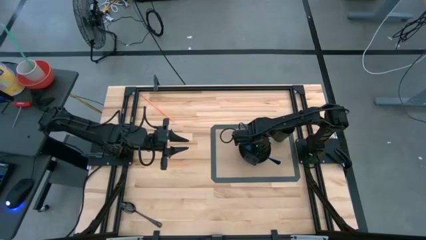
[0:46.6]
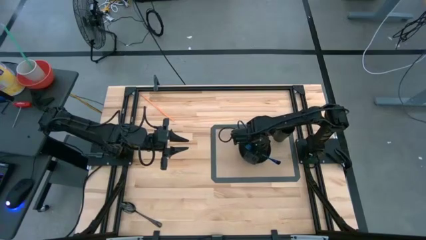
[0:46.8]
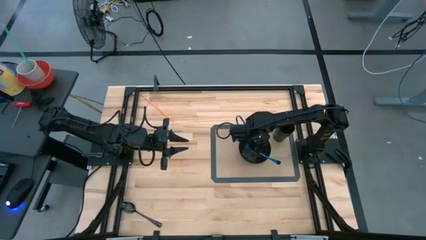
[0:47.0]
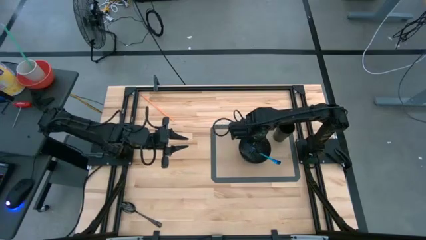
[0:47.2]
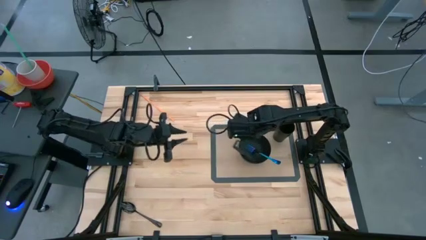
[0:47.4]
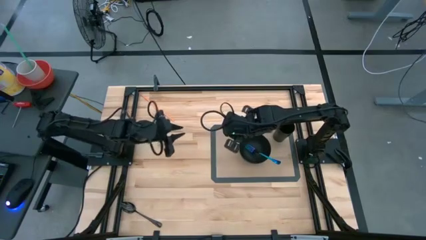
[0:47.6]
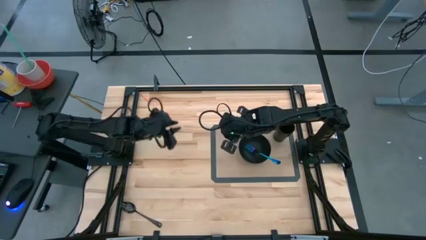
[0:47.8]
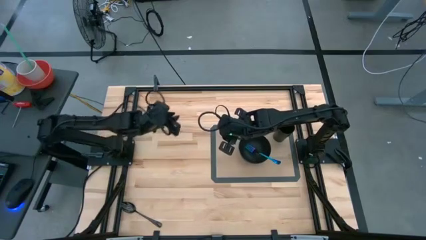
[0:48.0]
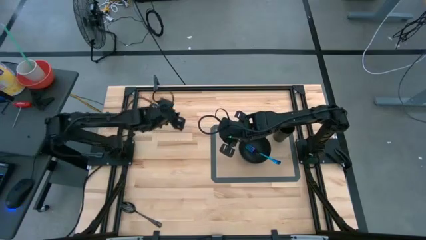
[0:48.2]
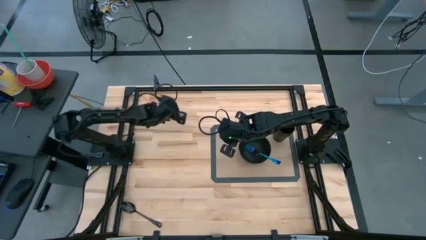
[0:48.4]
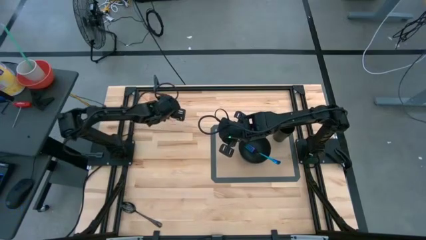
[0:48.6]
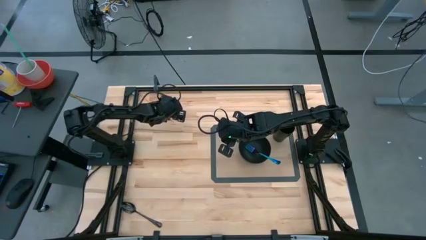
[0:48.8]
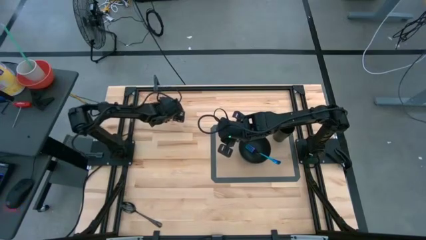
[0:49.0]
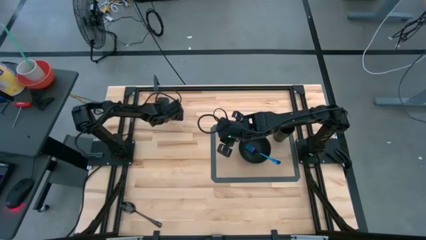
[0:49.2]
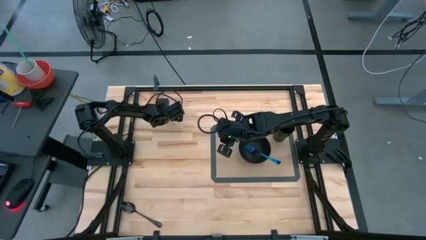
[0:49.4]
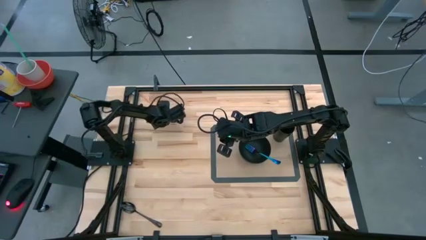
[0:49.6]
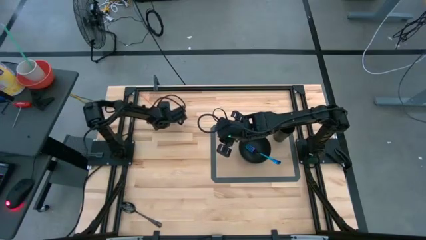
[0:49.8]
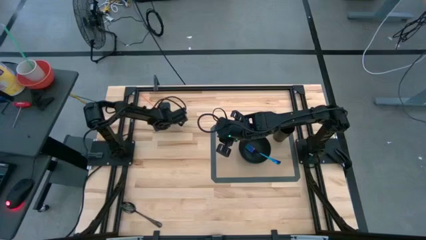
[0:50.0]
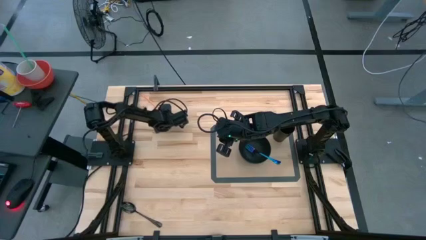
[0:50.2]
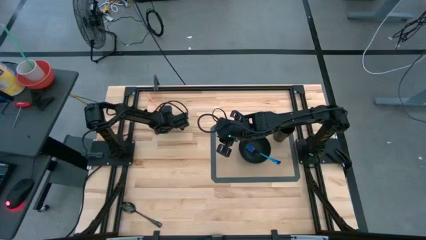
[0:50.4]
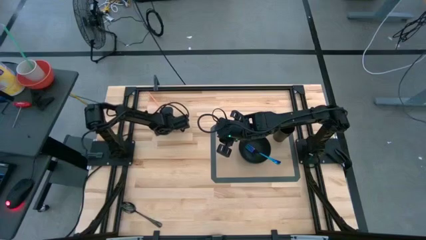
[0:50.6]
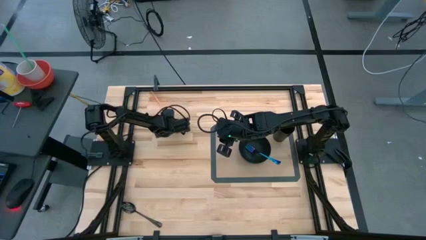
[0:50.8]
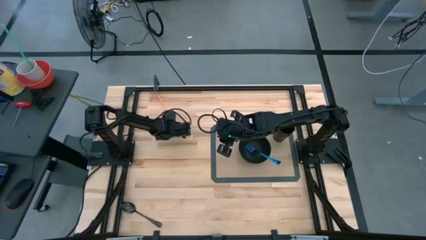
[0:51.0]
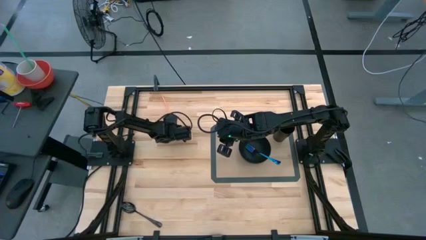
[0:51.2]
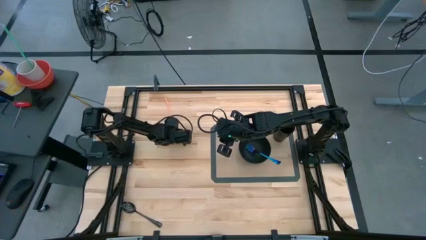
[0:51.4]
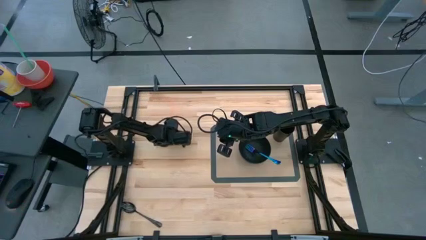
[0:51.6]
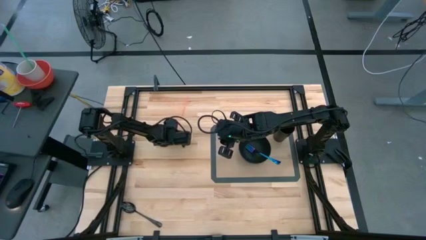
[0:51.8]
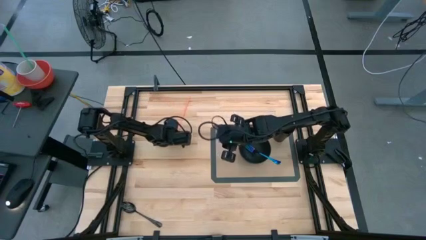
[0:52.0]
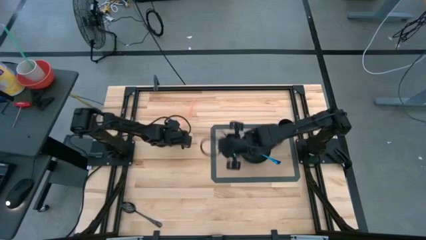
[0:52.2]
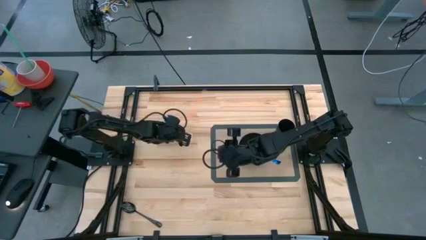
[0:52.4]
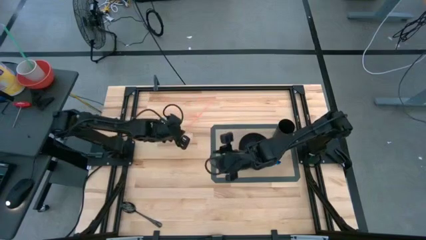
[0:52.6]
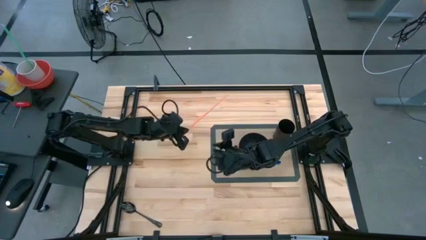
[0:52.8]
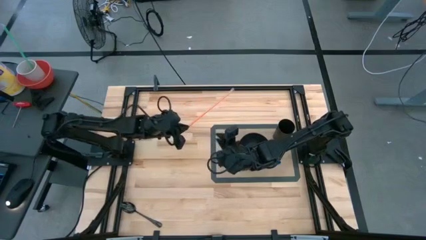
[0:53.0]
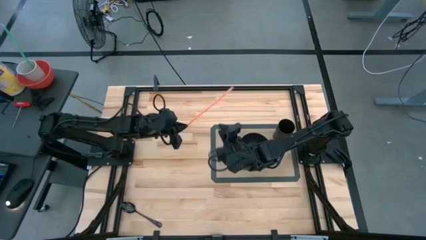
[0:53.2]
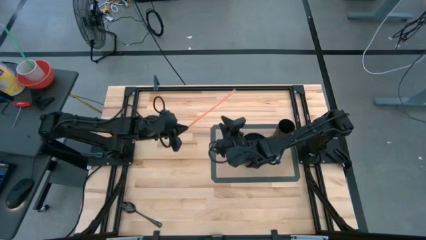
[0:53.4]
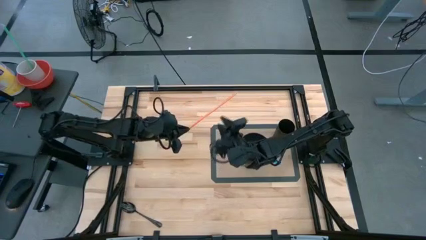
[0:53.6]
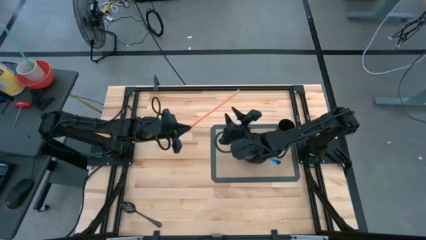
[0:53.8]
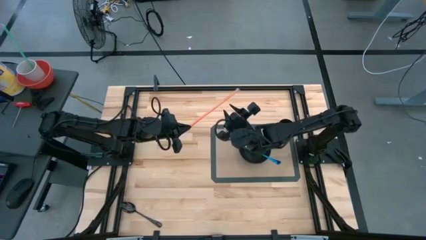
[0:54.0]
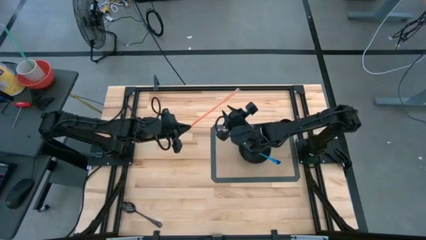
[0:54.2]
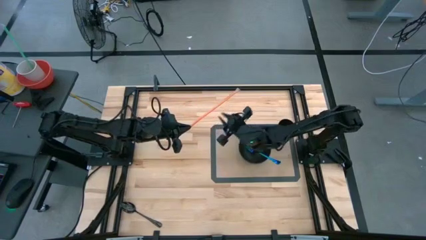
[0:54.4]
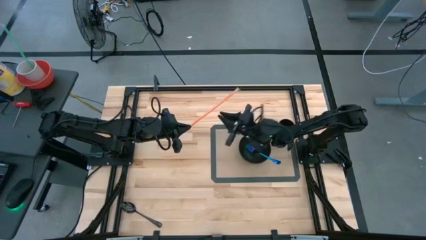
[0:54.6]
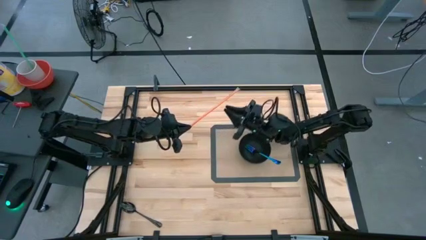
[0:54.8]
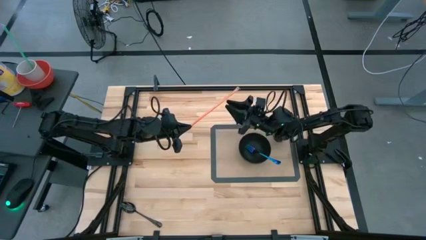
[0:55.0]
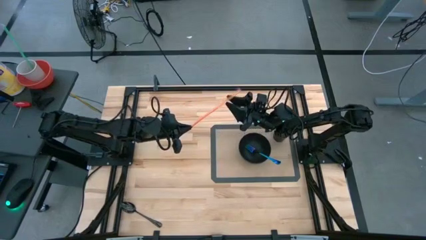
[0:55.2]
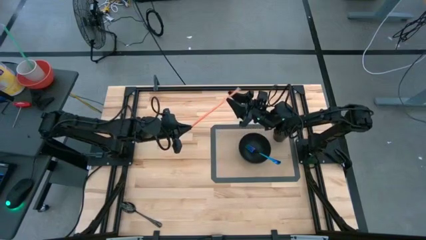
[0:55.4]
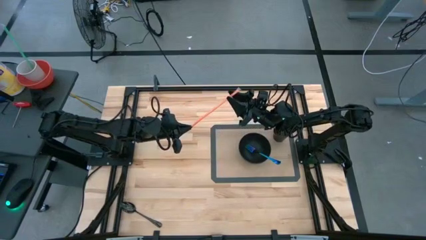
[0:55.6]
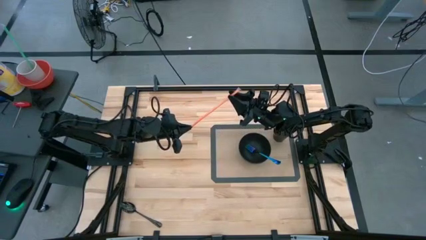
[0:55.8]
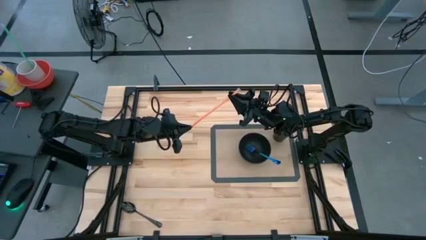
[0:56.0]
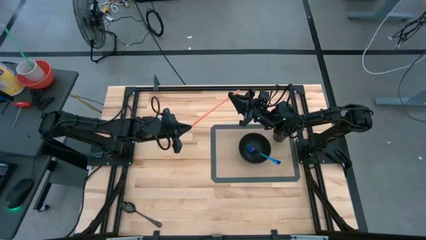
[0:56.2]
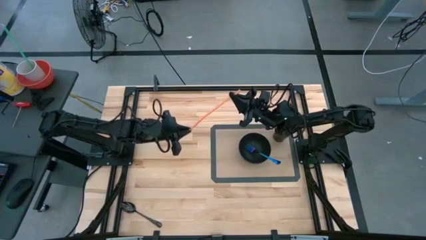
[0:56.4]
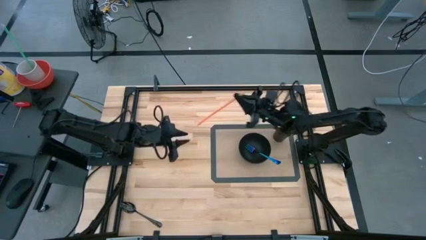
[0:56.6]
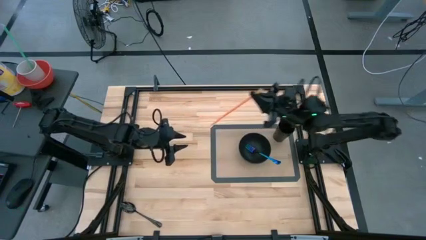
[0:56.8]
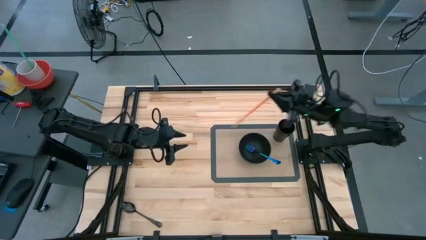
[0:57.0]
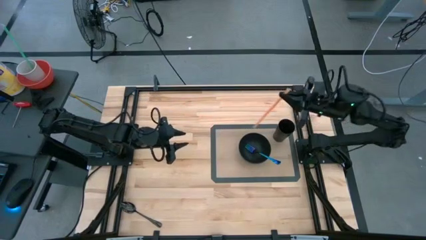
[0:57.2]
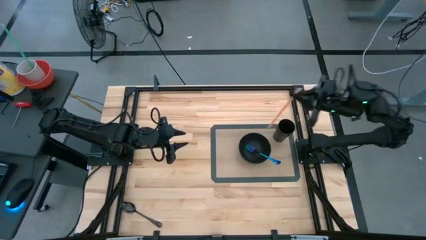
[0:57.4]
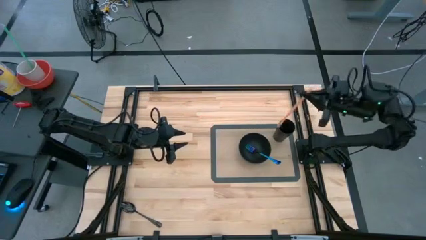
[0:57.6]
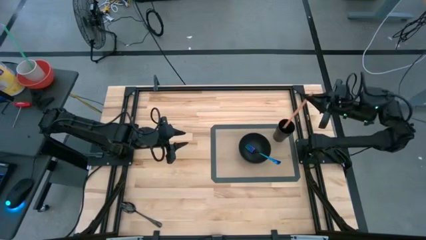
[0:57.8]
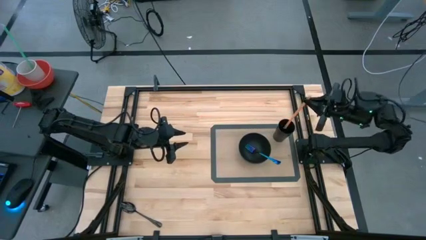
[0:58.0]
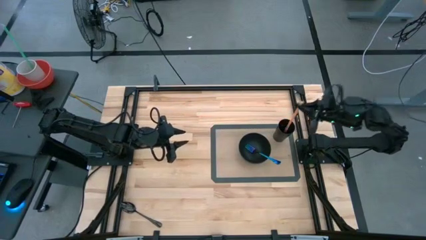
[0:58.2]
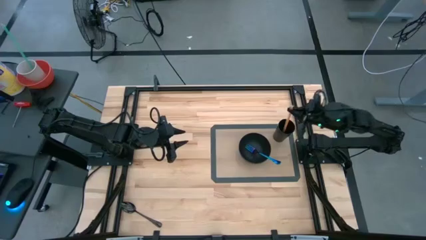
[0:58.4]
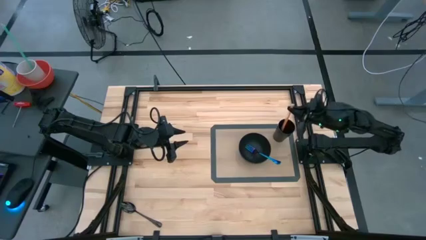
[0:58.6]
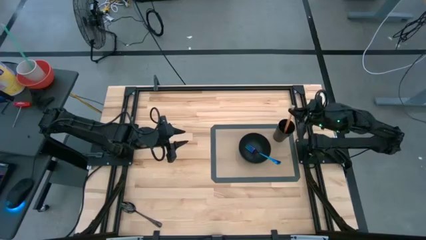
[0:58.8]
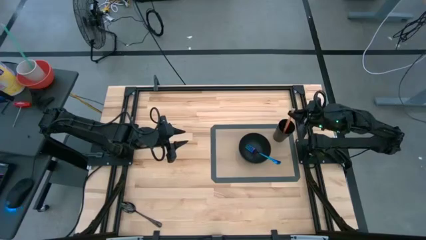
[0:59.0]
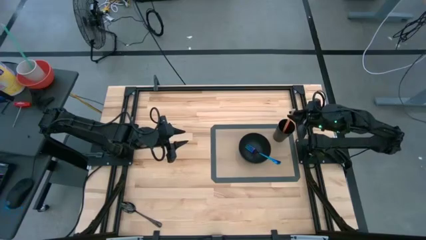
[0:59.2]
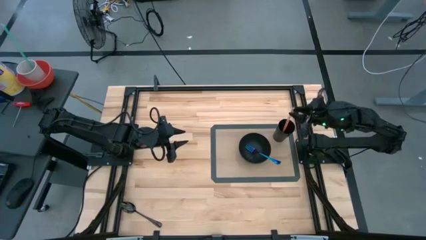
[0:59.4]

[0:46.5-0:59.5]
Task: Pick & Place Utensil
Put the orange drinking straw into the black cup
